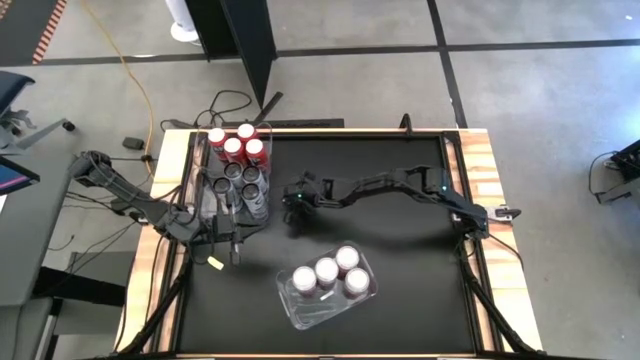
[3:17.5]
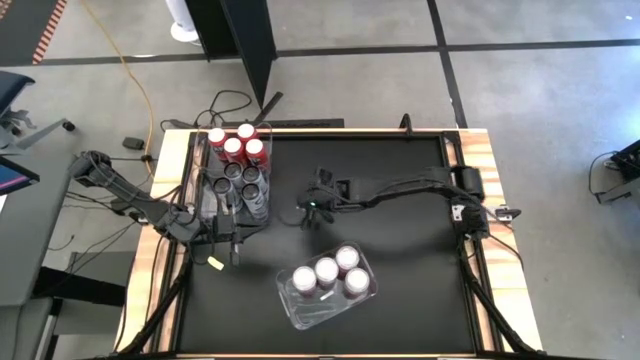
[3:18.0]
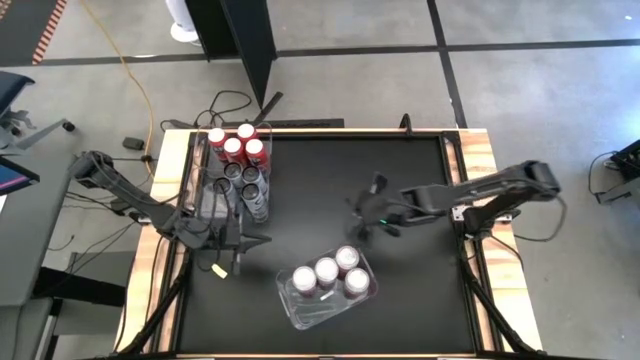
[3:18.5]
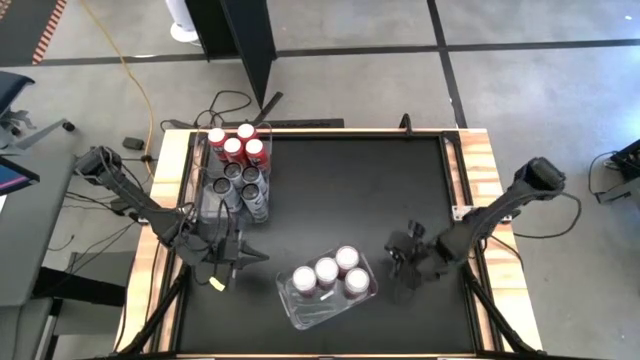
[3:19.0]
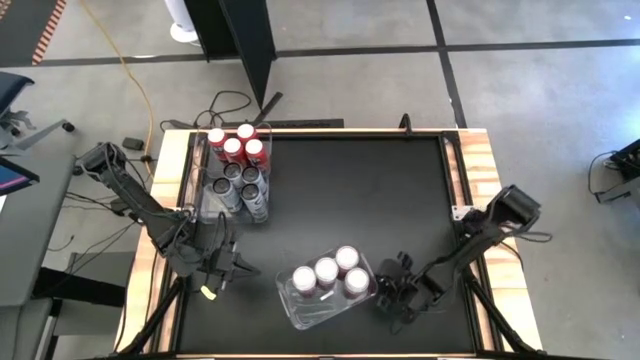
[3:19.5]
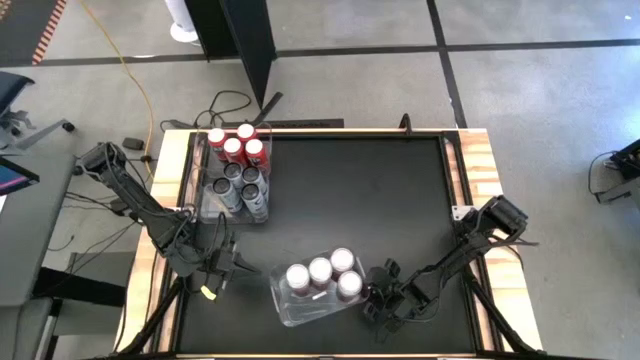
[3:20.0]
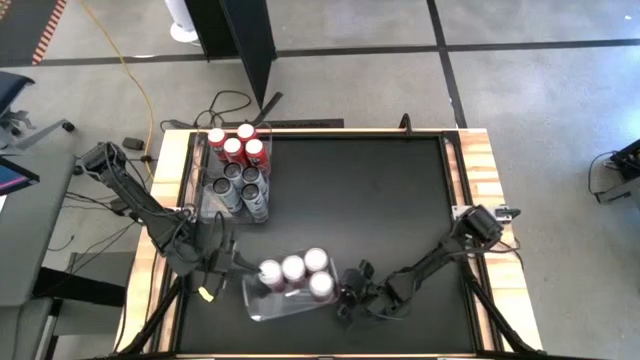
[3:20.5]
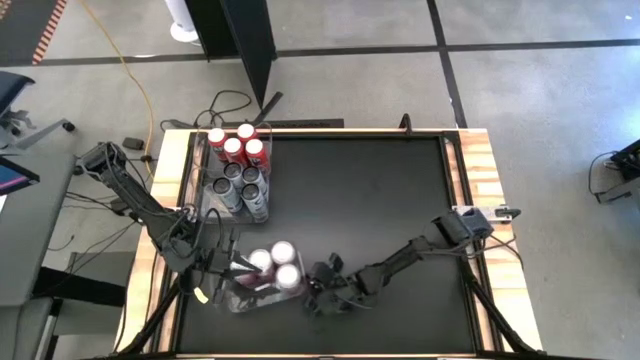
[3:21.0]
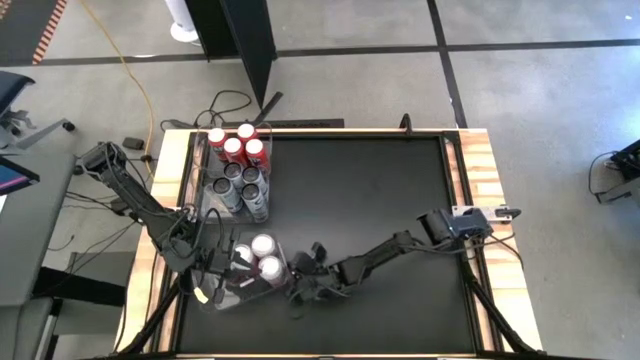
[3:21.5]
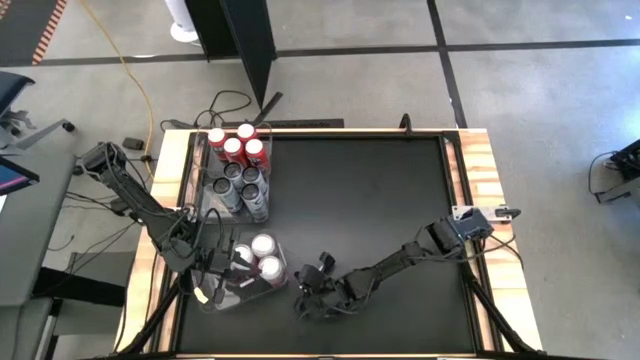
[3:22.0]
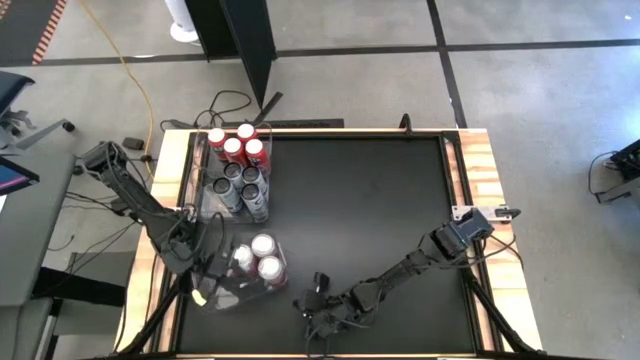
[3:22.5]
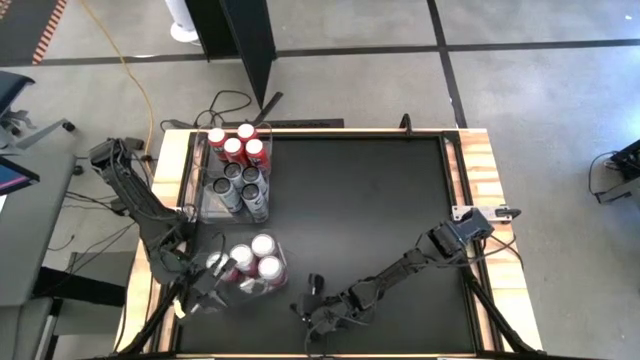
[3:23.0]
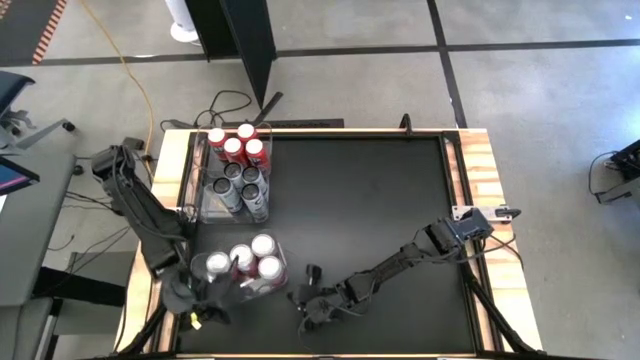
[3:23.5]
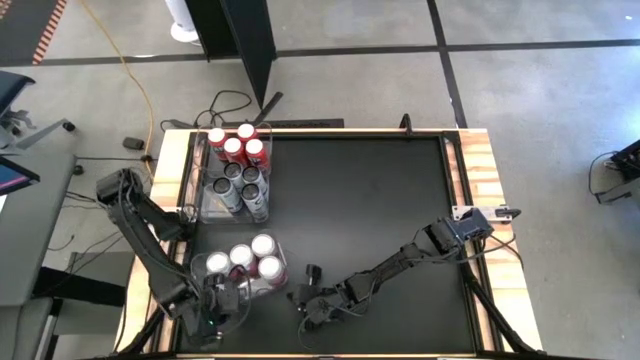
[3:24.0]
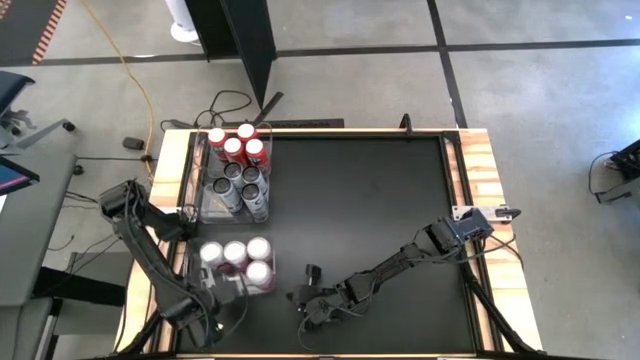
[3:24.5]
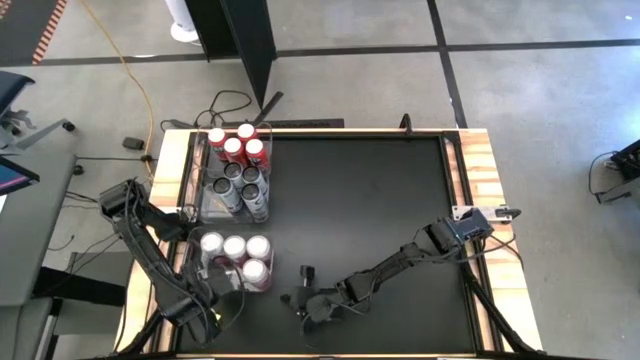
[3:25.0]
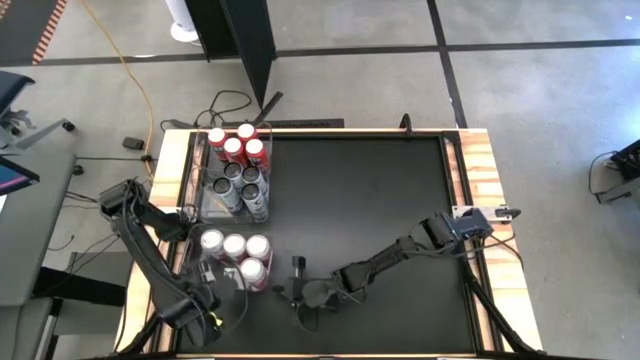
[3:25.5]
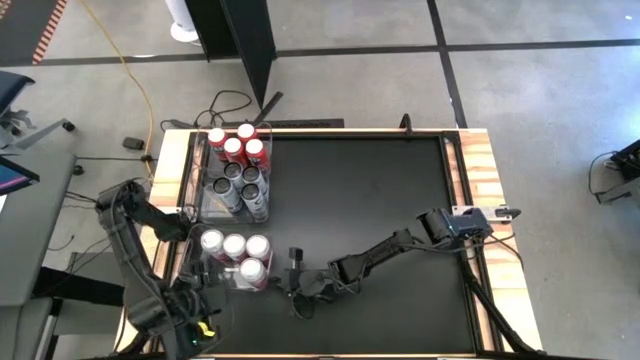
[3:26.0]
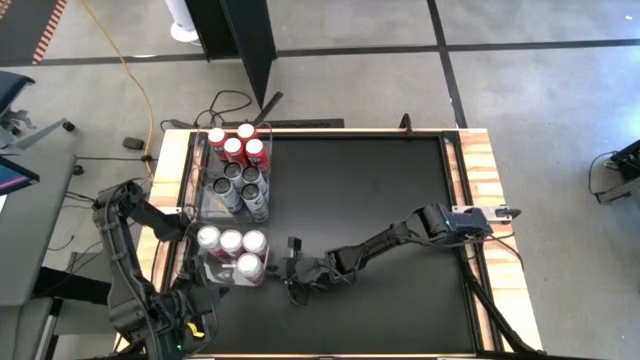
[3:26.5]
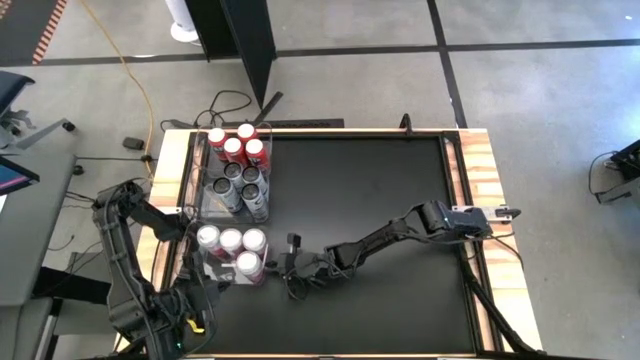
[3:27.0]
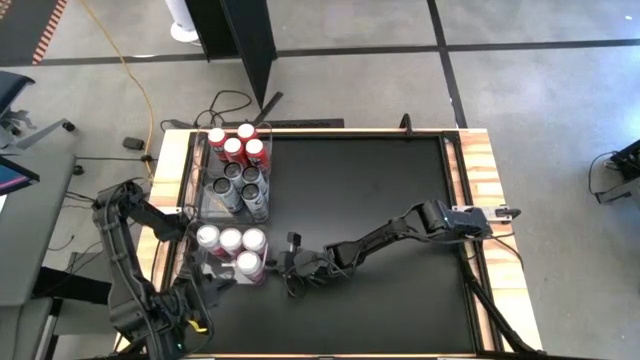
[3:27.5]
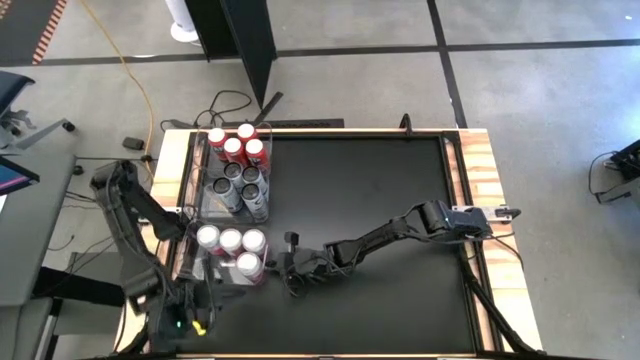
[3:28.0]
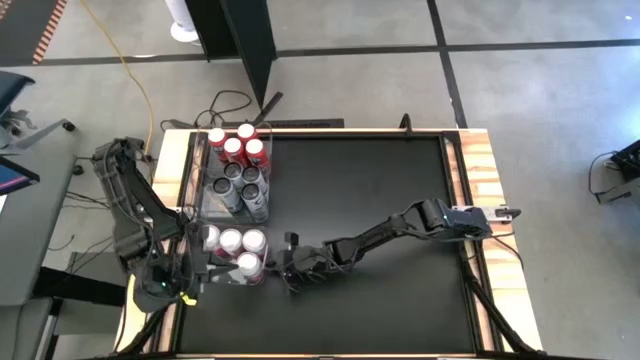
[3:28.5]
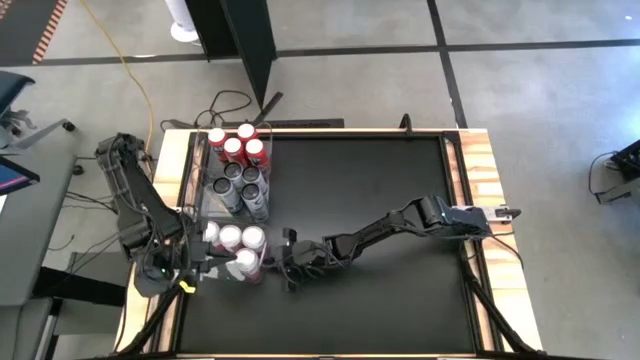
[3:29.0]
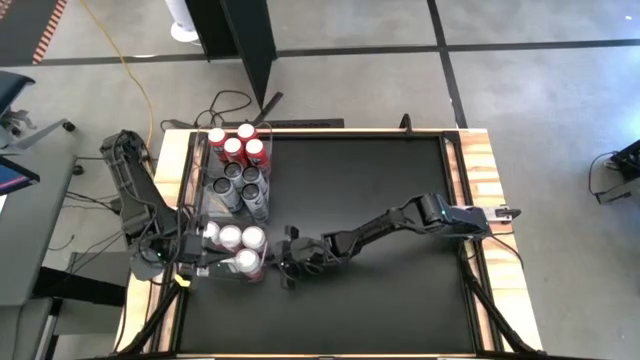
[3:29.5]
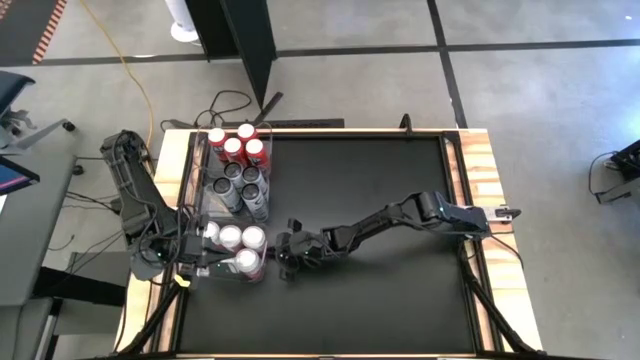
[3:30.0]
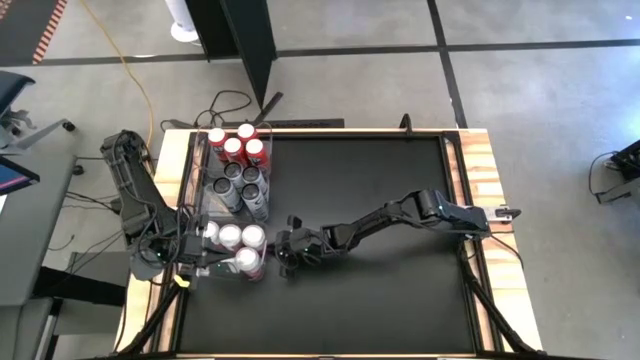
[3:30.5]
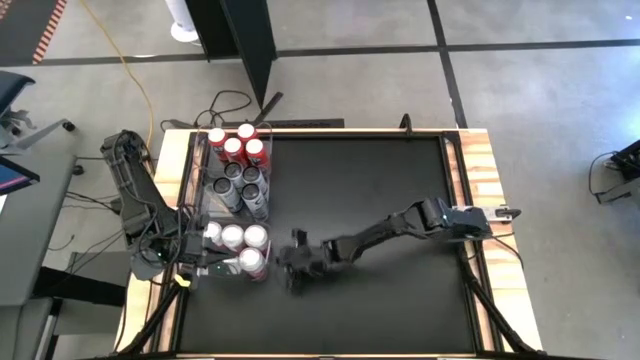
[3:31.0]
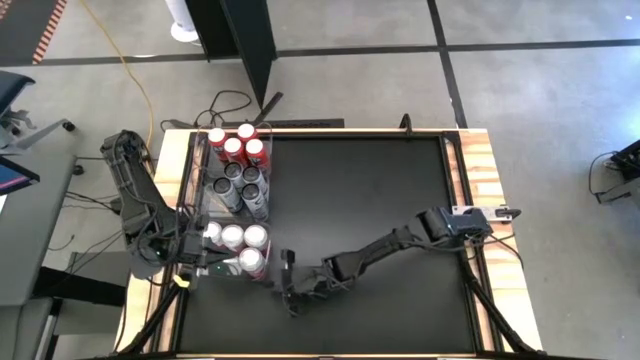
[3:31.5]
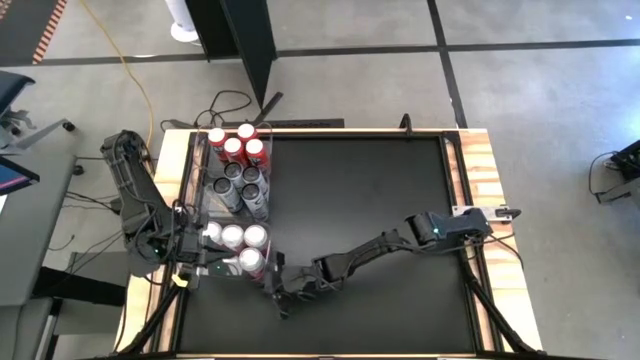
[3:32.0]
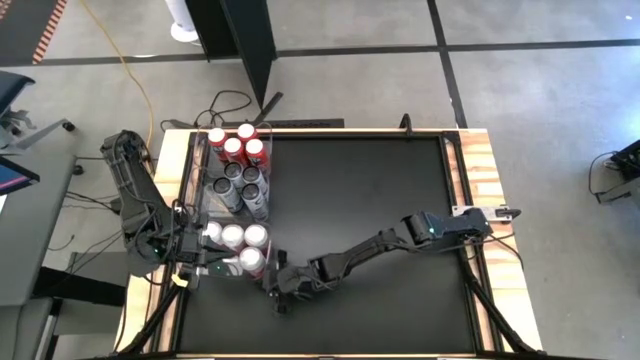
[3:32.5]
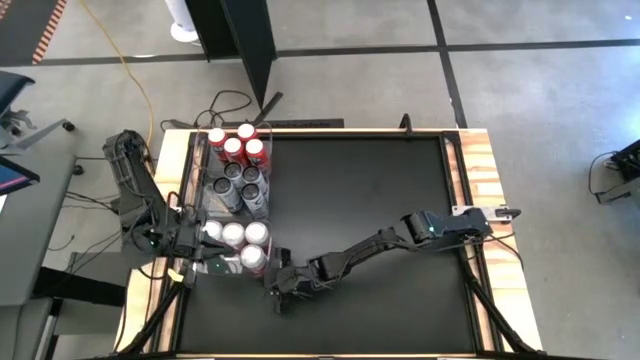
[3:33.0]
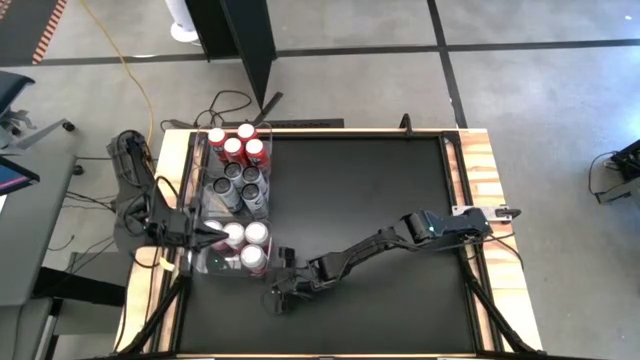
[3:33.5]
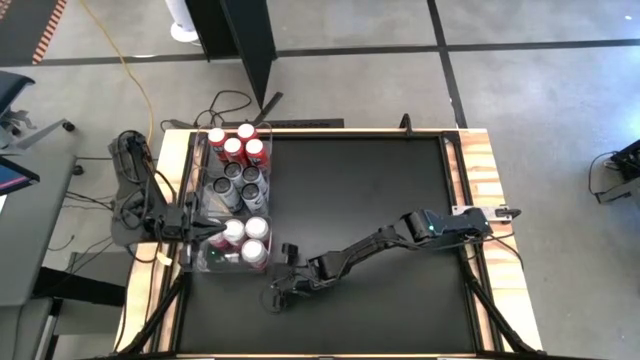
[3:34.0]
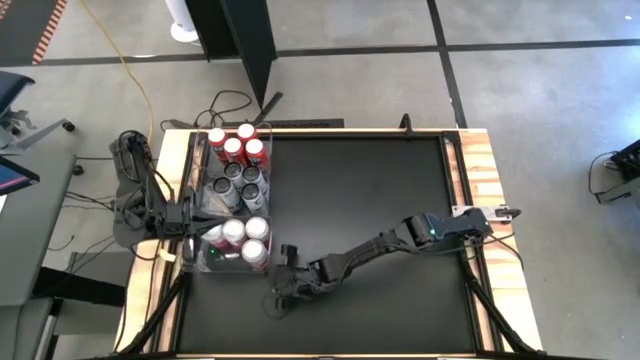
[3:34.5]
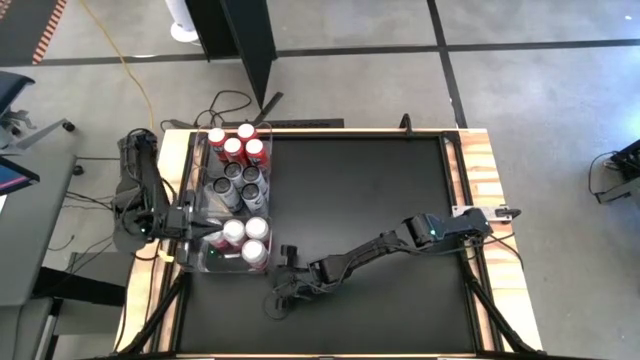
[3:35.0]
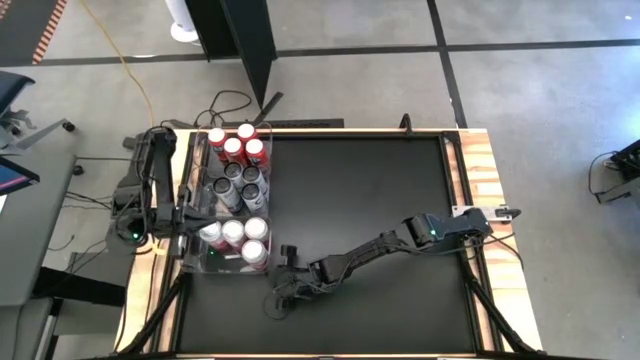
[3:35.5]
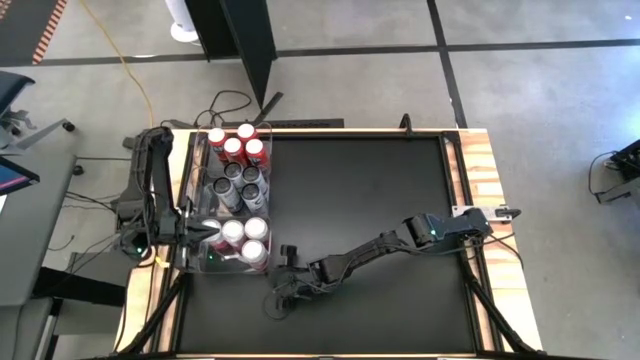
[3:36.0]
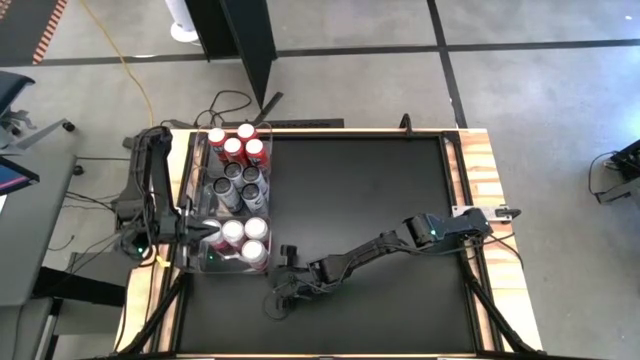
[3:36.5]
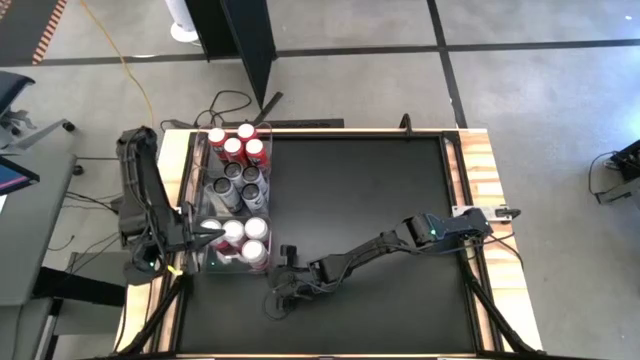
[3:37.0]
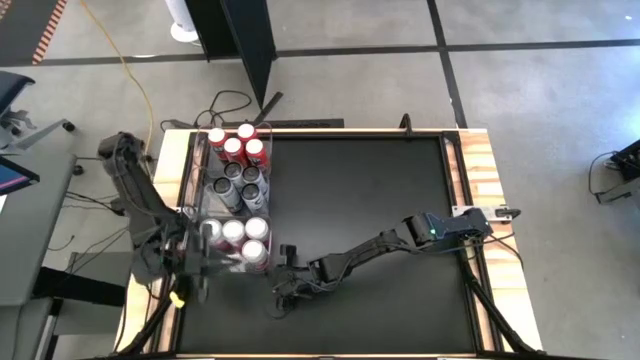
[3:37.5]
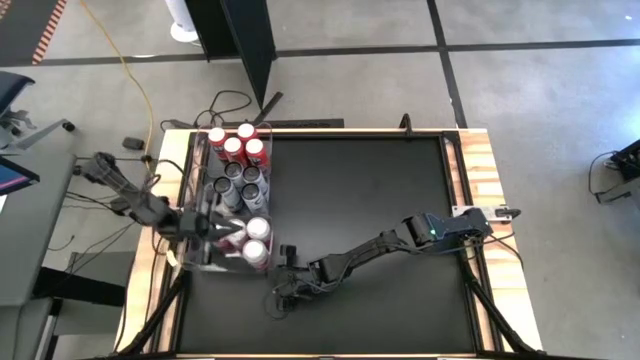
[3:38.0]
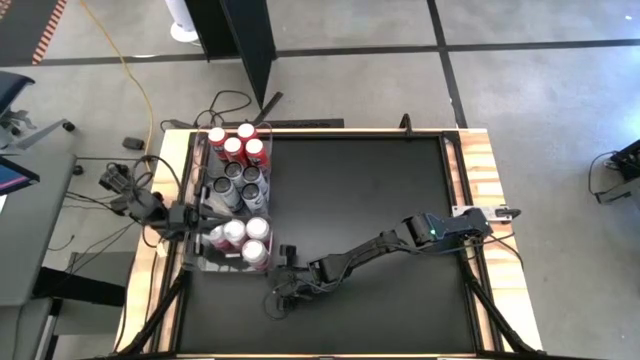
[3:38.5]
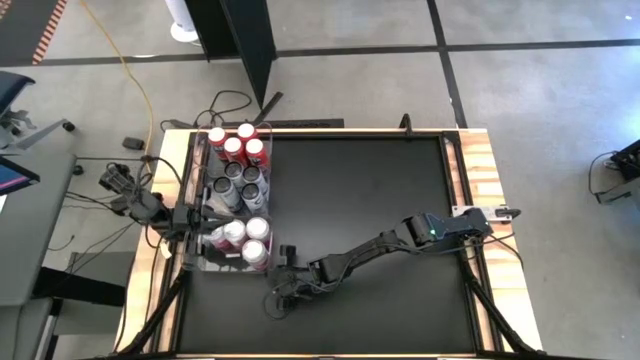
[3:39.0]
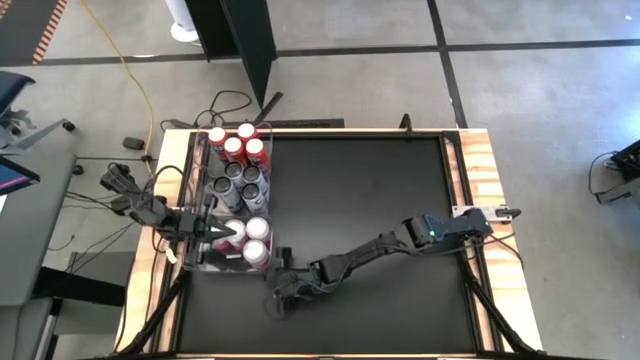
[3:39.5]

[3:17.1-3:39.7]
Task: Sort soda cans
Move the bottom transparent bin to the bottom left of the table
